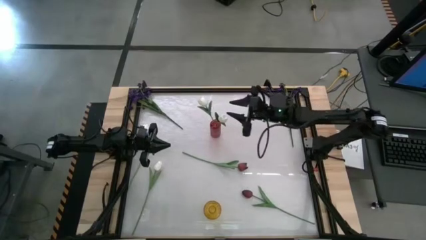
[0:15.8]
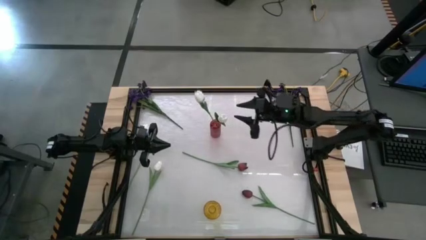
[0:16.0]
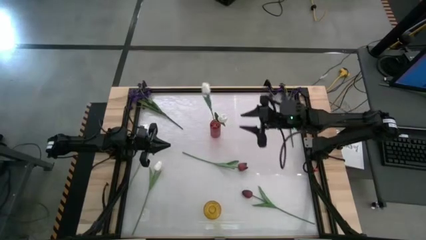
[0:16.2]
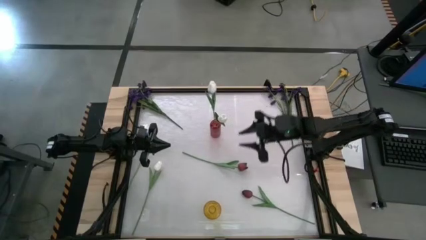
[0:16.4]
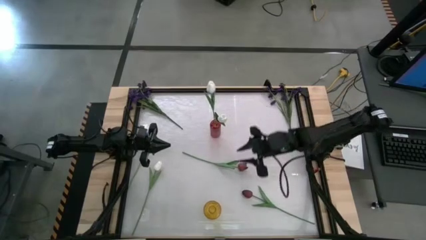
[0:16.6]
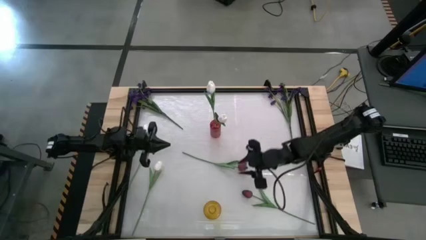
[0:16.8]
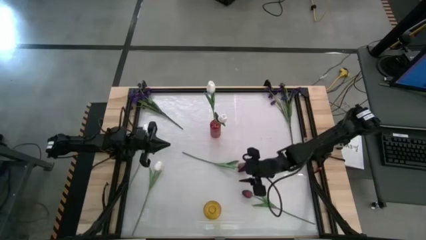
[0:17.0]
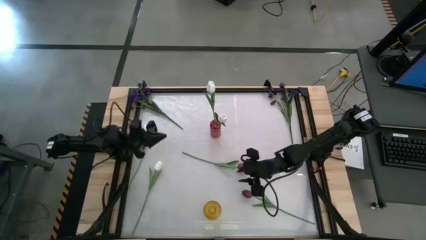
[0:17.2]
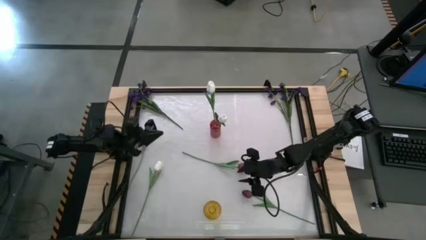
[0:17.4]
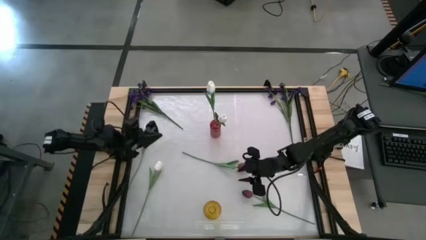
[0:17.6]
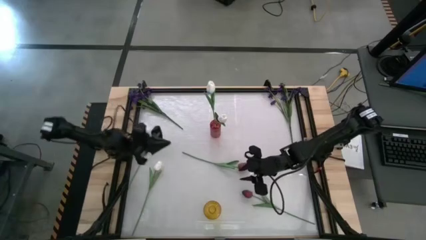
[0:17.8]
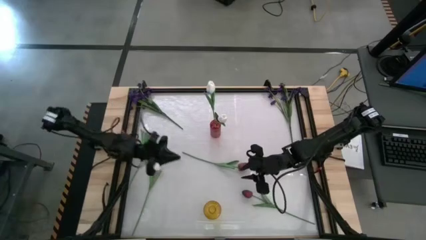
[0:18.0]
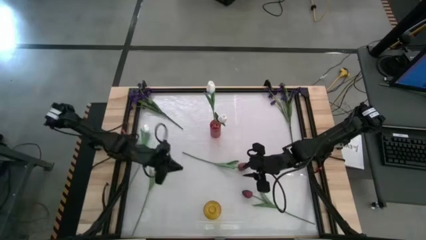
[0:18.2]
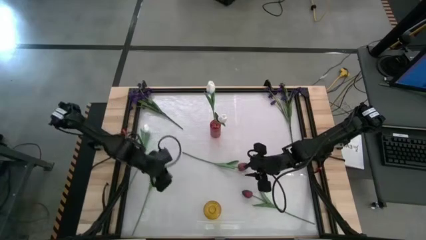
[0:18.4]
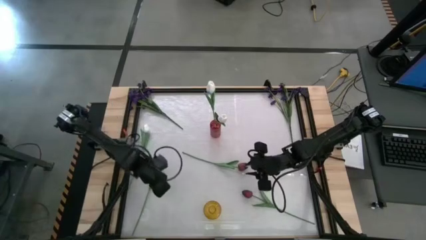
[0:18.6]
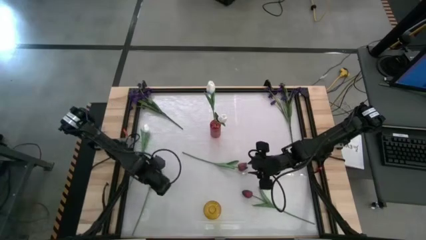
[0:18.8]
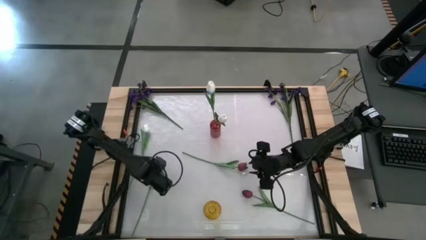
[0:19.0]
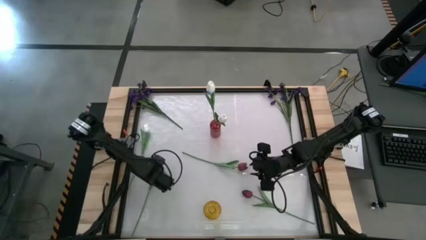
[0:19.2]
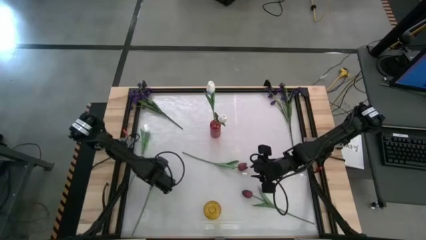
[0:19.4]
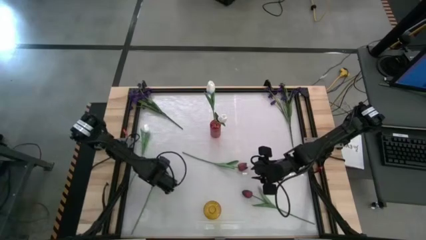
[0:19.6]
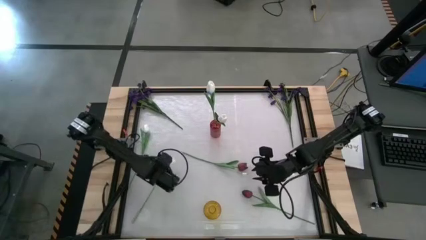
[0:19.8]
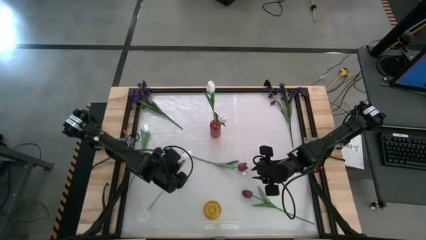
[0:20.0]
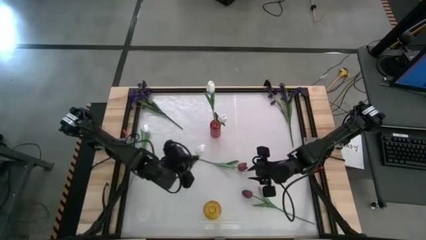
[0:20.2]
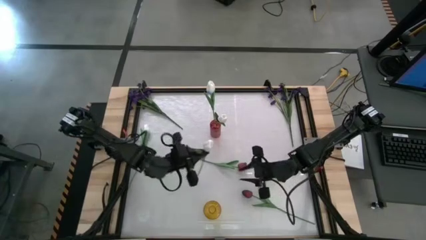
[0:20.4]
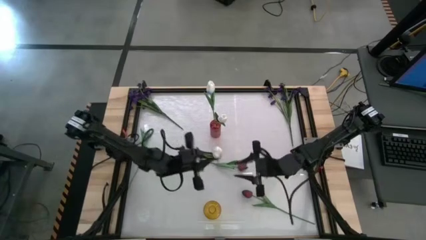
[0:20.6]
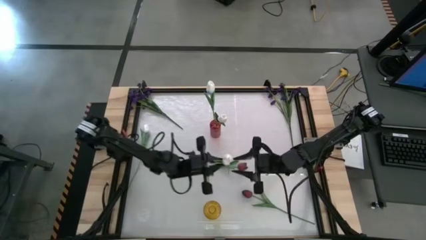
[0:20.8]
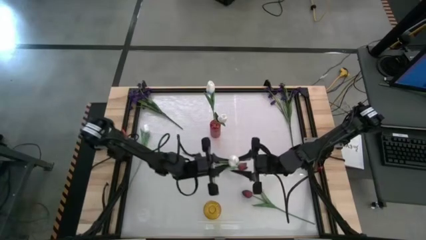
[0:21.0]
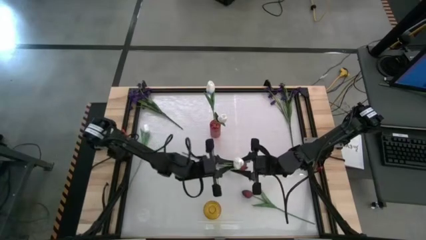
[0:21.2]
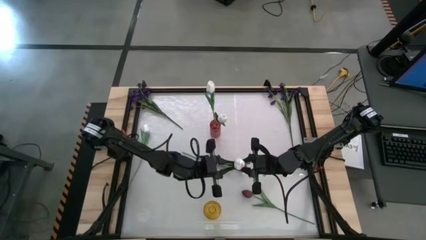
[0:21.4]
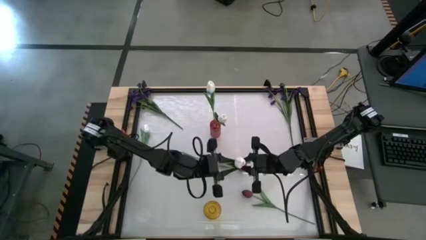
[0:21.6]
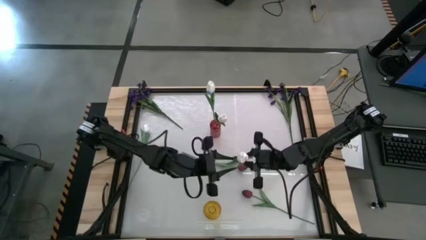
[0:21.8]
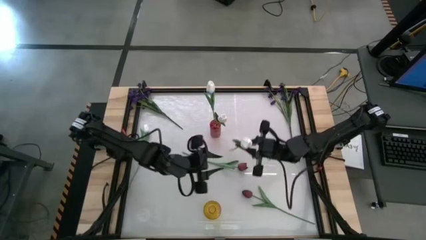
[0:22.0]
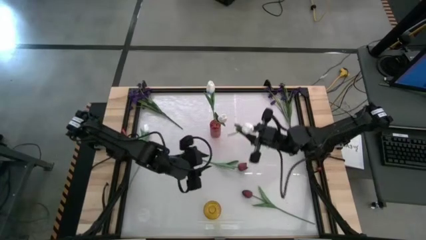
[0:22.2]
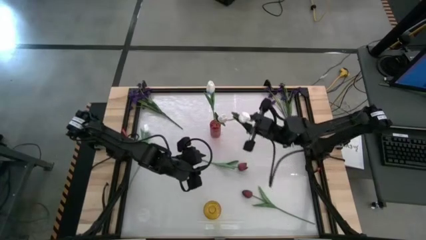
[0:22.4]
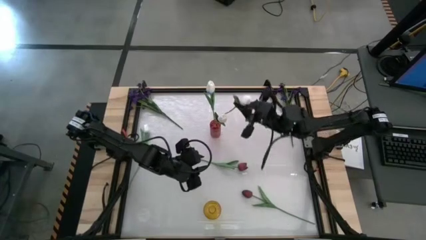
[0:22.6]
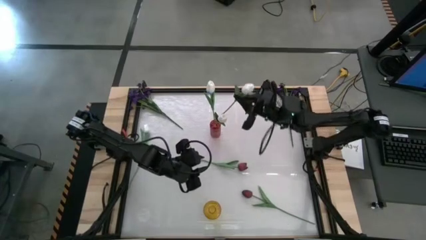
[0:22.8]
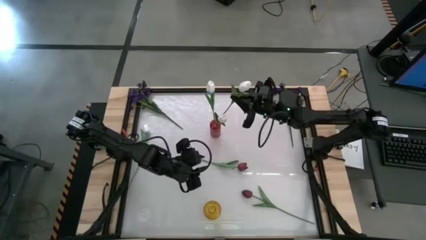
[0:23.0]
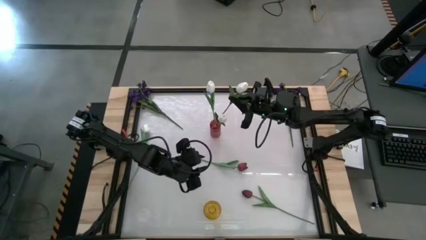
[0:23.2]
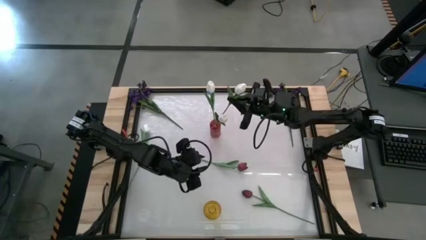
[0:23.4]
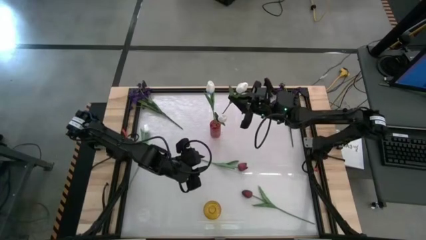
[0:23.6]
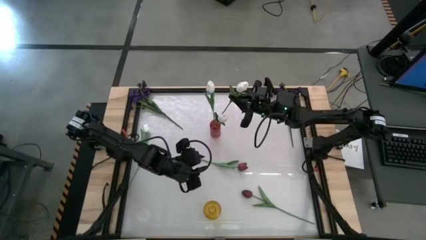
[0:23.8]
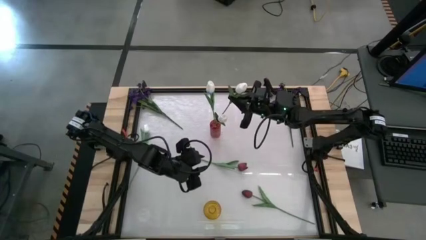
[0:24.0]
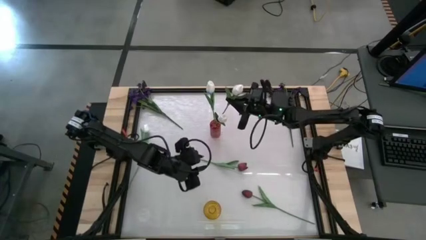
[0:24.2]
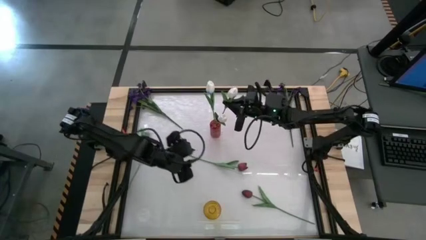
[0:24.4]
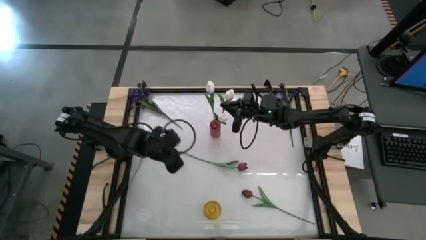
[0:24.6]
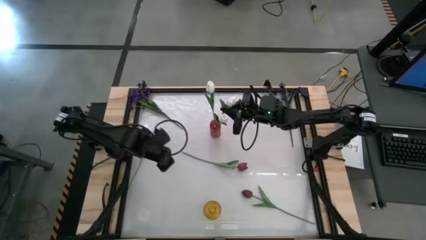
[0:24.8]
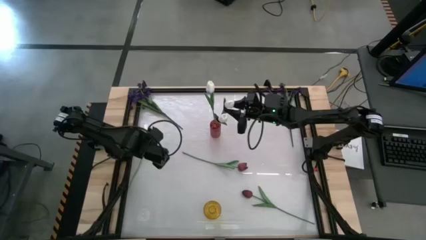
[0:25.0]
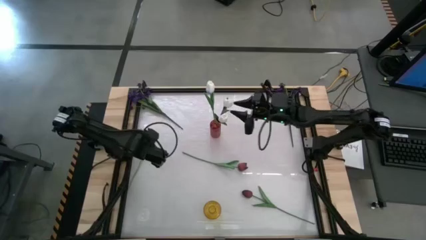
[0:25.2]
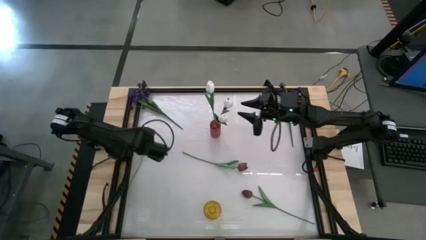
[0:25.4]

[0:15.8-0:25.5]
Task: Sort flowers into vase by color
Put the bottom white tulip into the red vase

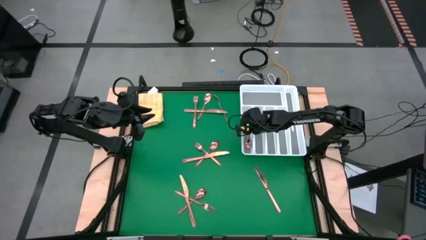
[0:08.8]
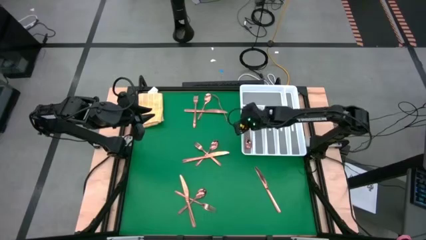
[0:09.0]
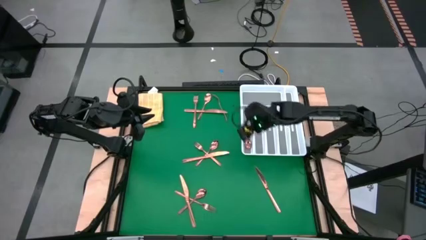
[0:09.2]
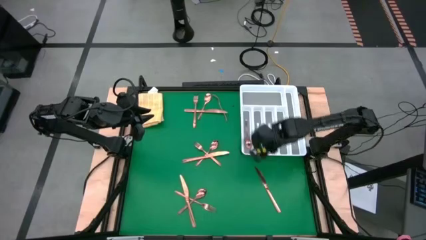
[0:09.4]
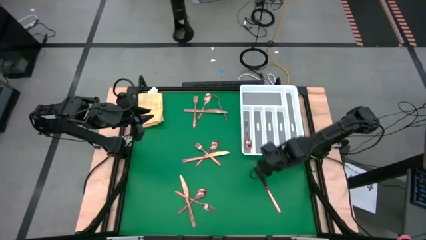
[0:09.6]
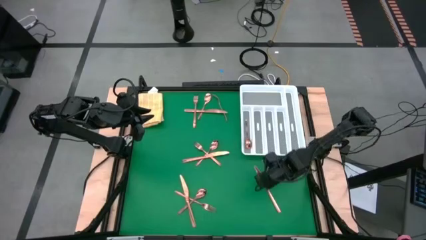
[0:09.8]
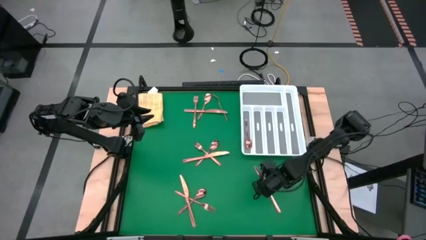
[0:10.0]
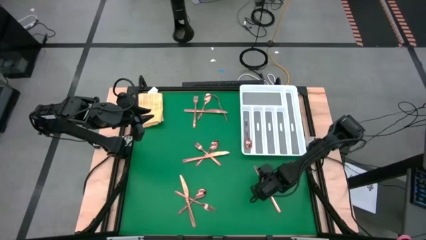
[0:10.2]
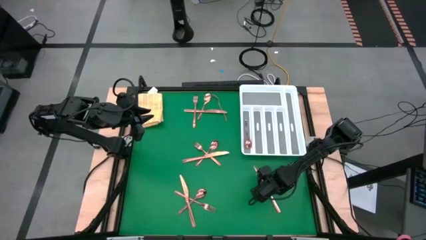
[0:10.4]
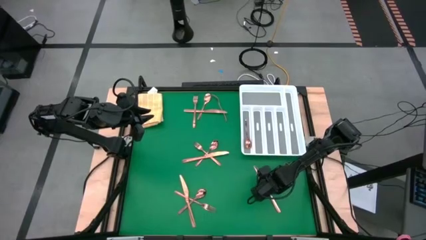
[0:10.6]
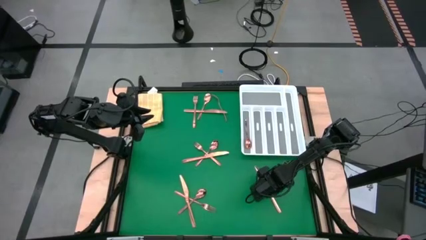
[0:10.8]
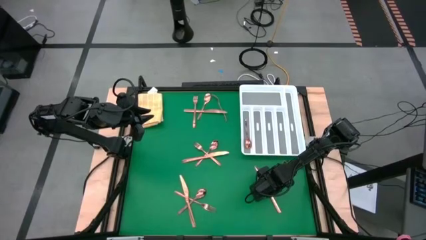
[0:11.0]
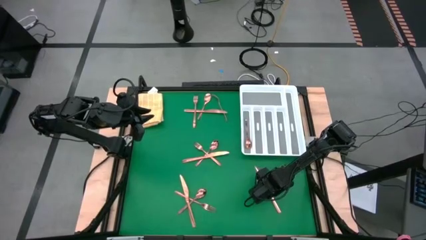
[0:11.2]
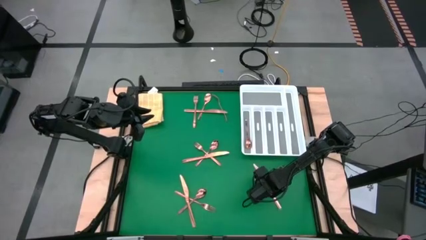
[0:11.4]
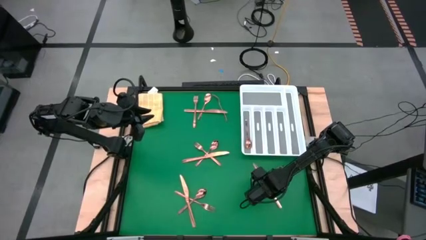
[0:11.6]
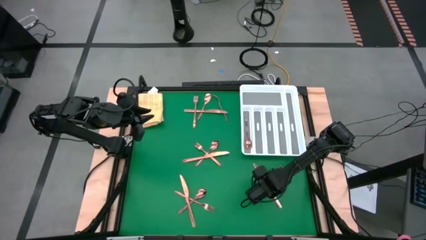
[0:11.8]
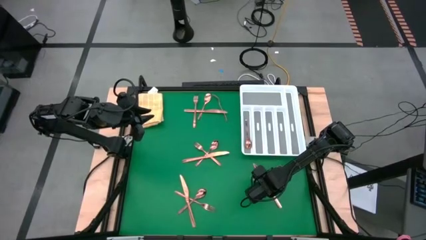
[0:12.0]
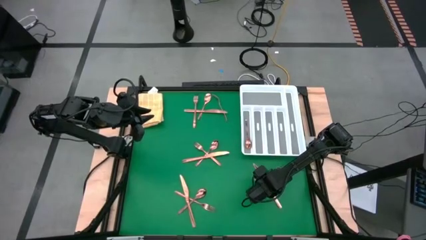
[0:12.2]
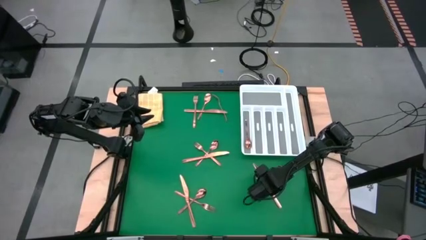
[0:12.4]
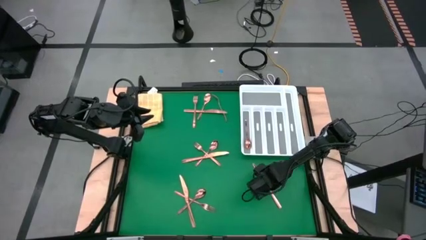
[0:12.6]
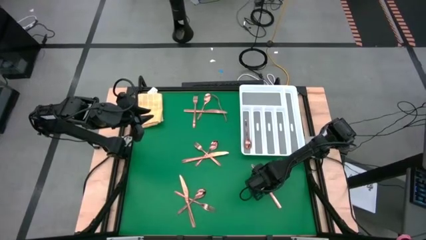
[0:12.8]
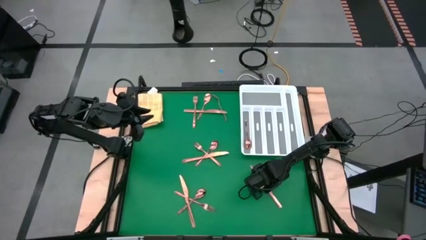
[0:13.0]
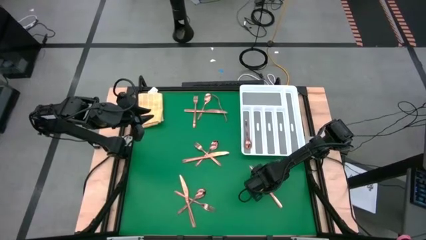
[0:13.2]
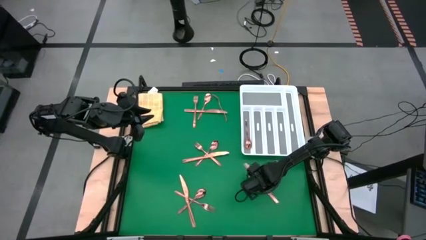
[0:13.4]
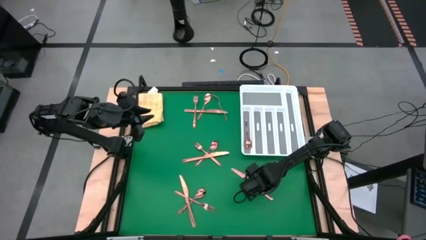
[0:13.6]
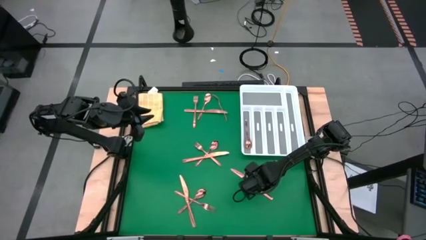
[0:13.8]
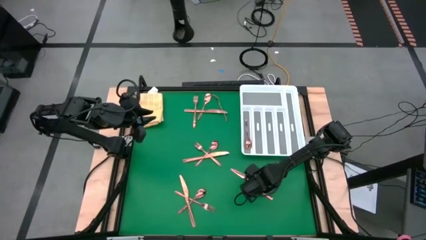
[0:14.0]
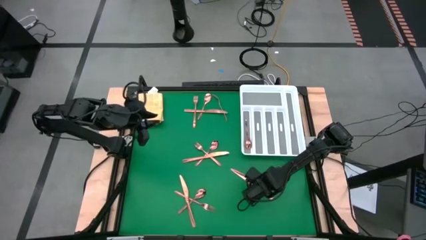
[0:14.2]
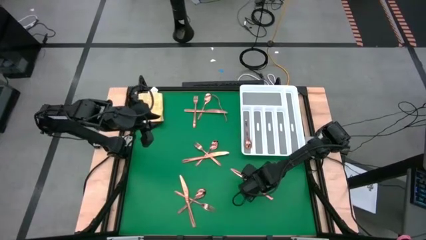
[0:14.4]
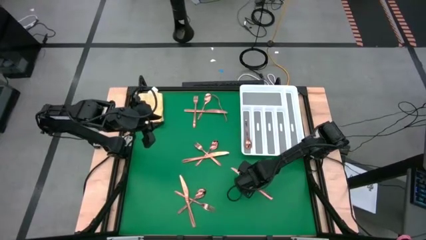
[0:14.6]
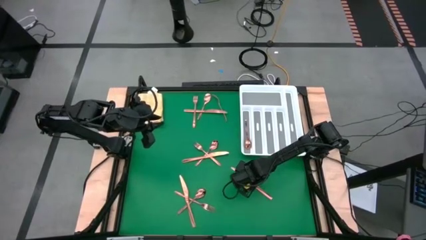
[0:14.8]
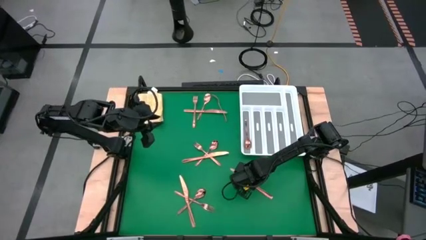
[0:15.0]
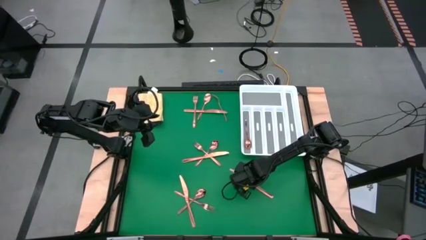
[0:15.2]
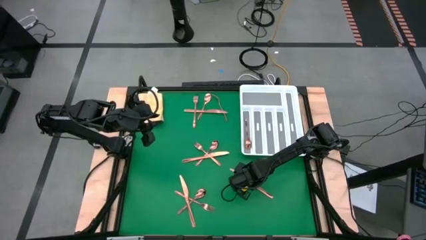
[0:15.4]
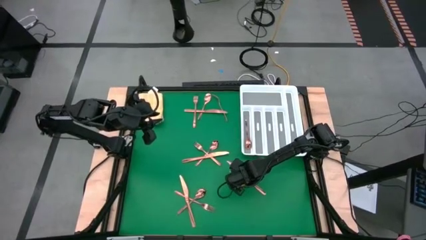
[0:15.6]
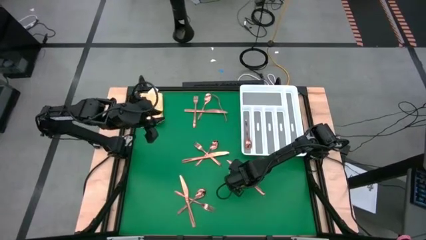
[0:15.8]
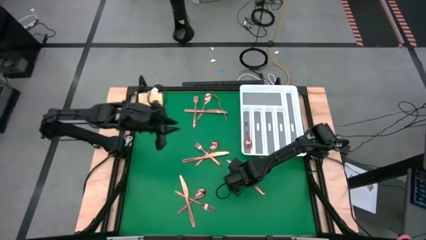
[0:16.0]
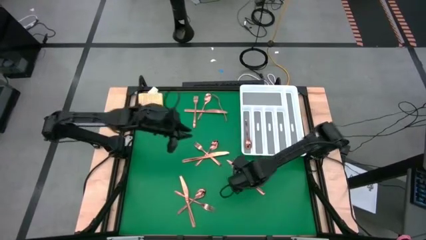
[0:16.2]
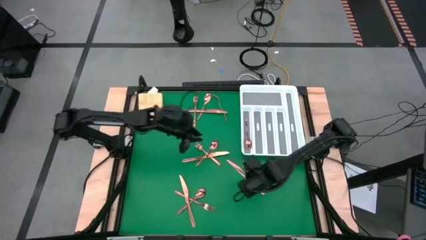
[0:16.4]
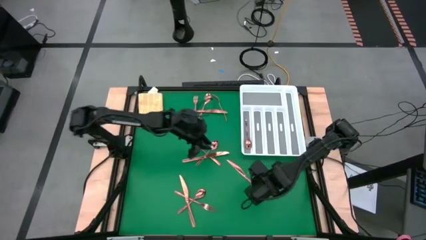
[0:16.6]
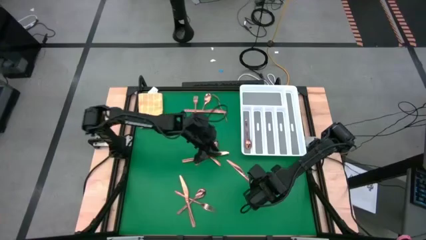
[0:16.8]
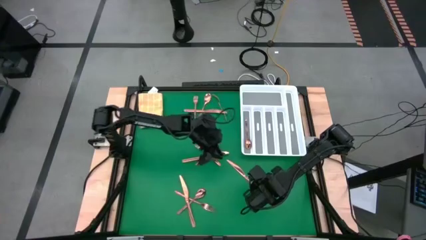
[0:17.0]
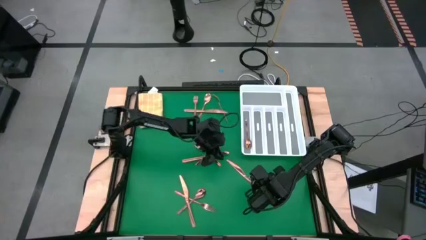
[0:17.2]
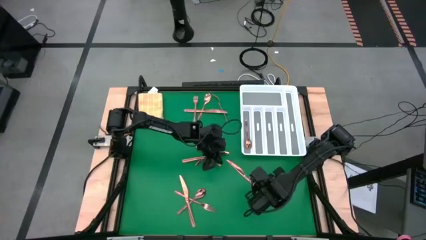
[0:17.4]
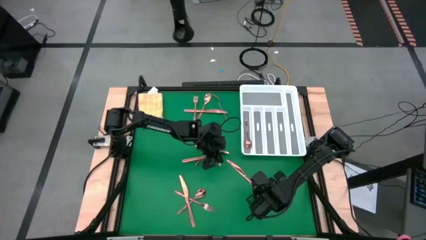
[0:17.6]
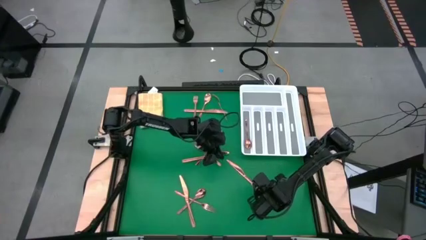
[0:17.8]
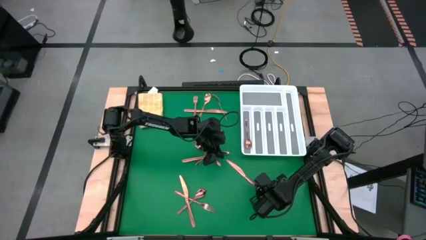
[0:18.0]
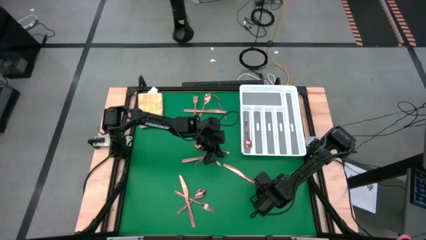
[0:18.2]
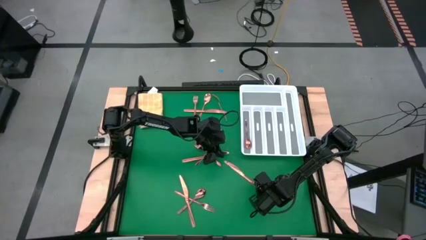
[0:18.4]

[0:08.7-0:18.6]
Task: Sort silverware
Put the bottom right gold table knife into the silverware organizer
